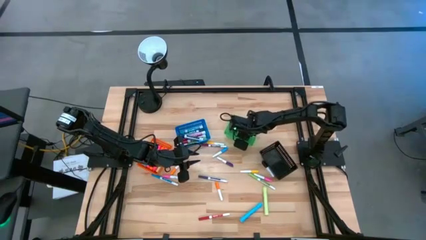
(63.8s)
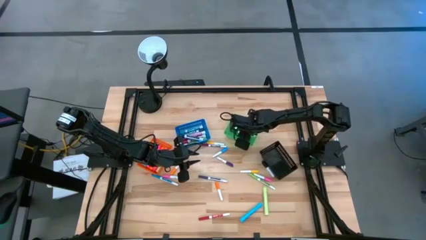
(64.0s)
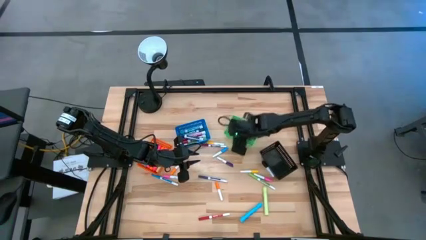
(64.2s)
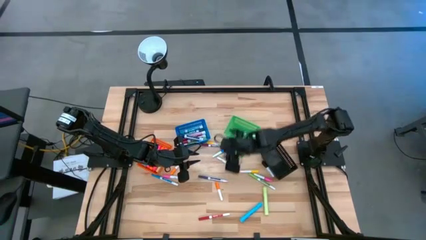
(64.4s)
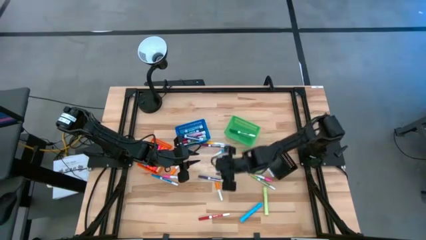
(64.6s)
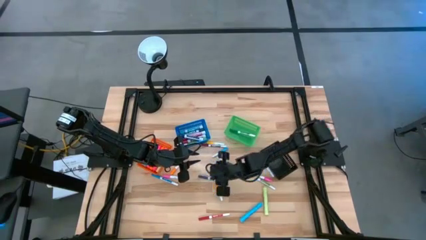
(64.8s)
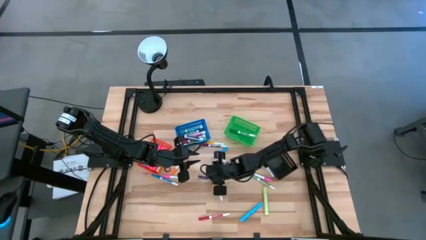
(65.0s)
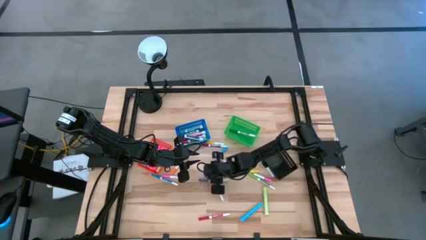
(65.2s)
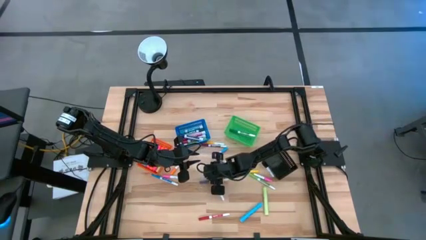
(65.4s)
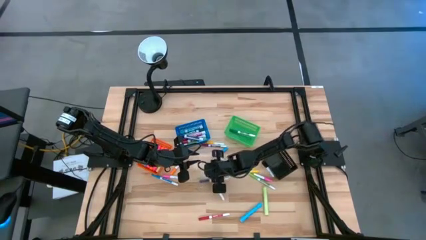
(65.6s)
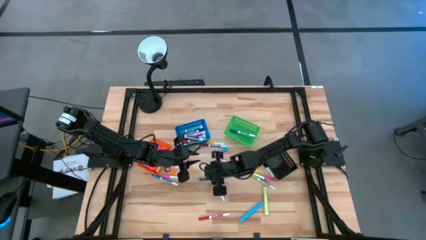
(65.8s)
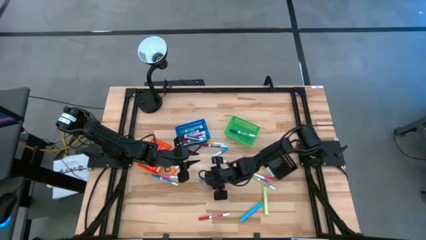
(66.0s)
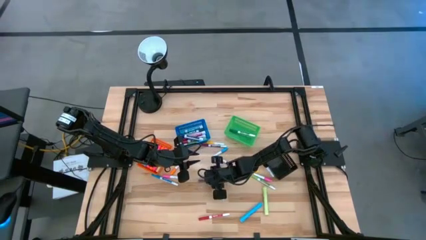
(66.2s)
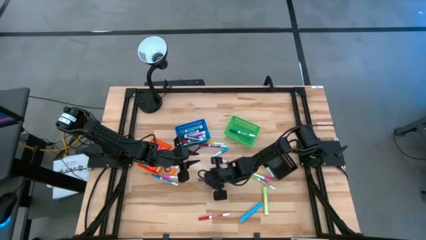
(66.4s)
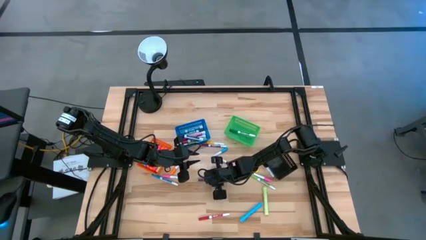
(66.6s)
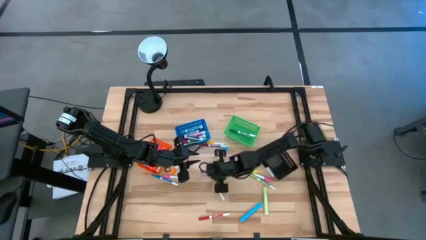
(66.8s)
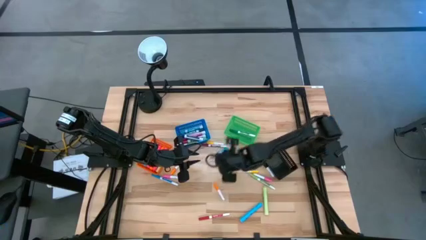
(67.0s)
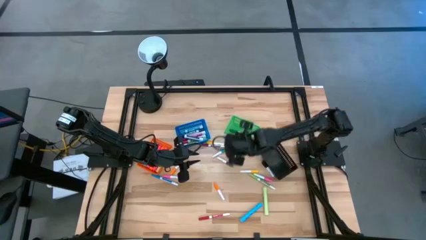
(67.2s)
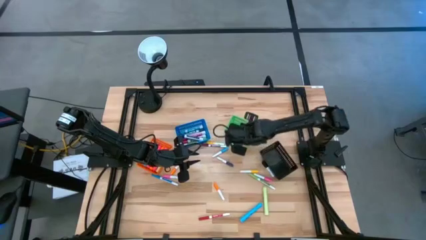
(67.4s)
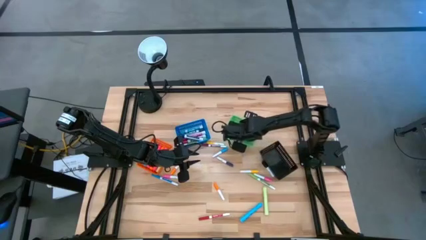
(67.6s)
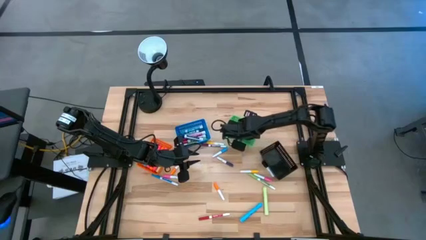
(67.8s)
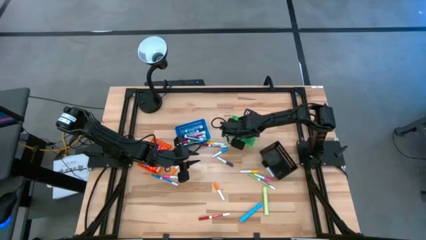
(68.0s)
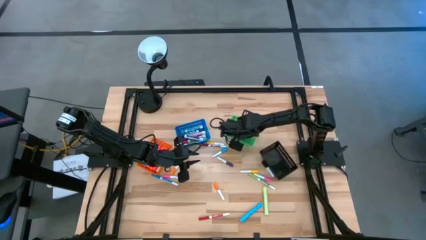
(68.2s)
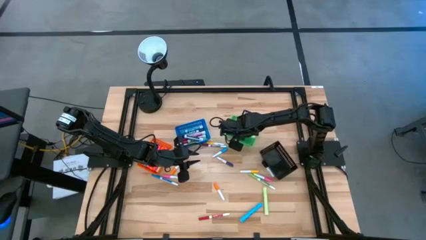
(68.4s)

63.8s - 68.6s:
Task: Pick & Place Markers
Put the large blue marker pen into the green basket

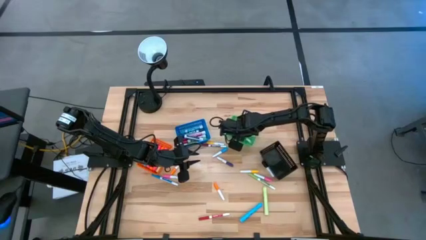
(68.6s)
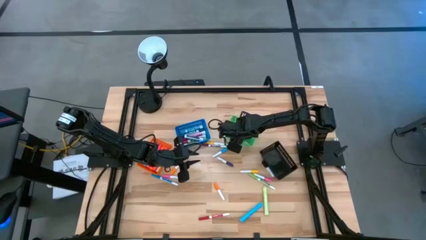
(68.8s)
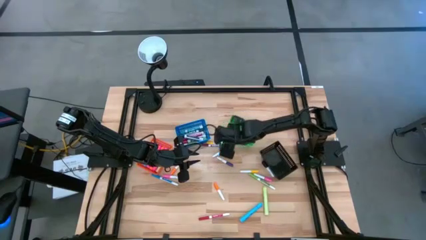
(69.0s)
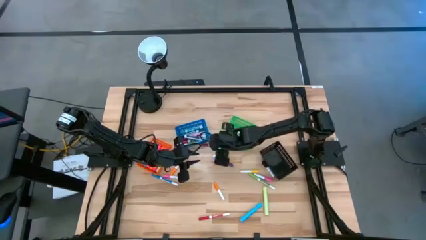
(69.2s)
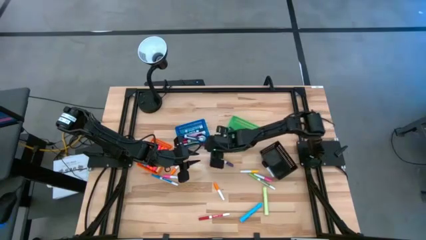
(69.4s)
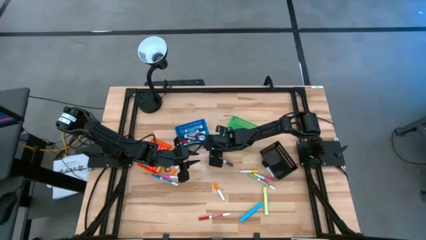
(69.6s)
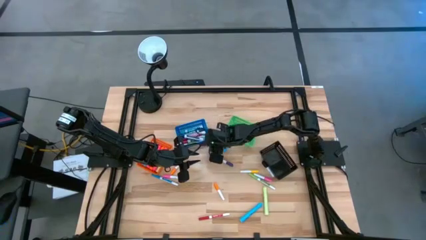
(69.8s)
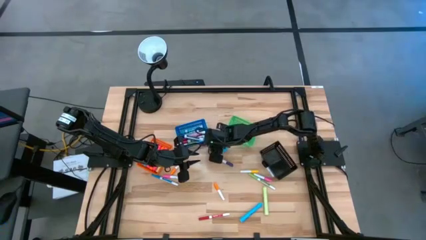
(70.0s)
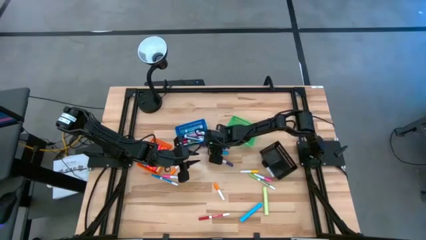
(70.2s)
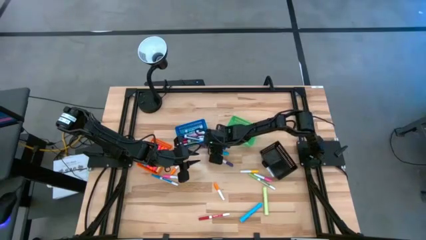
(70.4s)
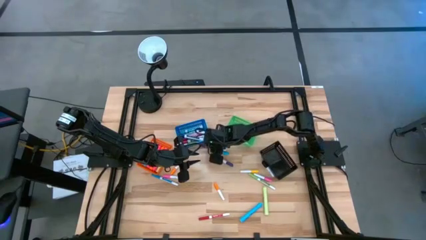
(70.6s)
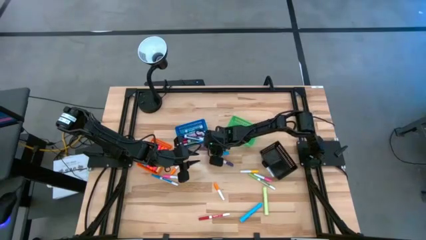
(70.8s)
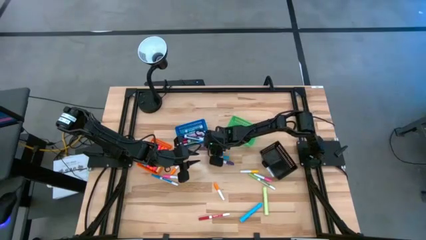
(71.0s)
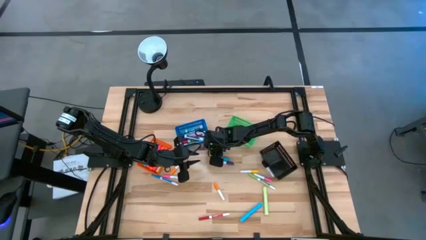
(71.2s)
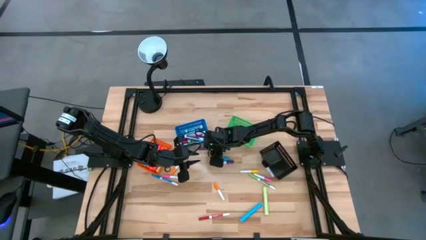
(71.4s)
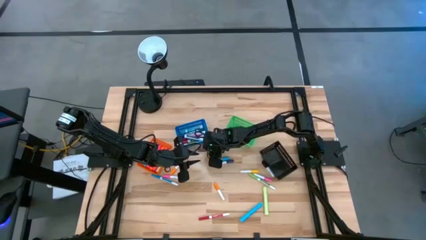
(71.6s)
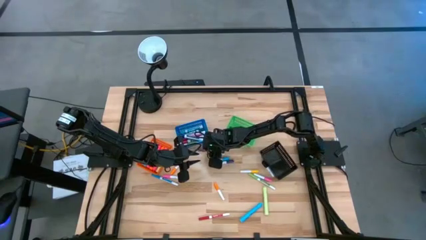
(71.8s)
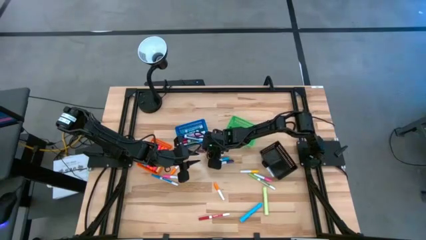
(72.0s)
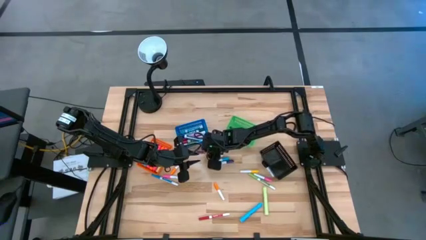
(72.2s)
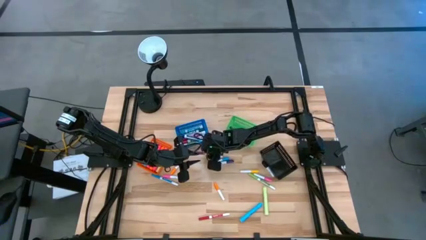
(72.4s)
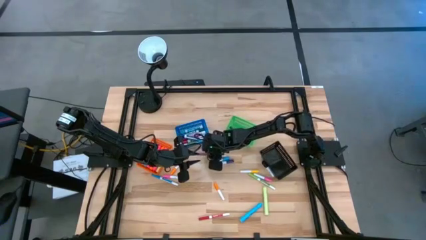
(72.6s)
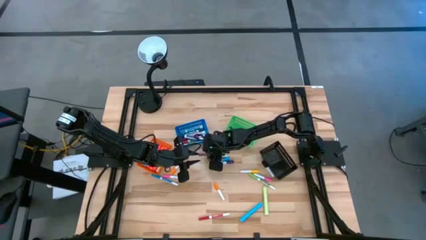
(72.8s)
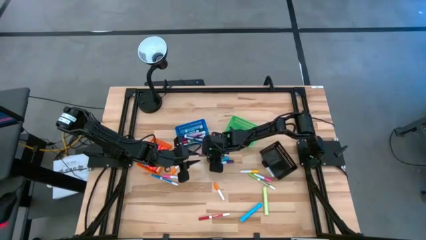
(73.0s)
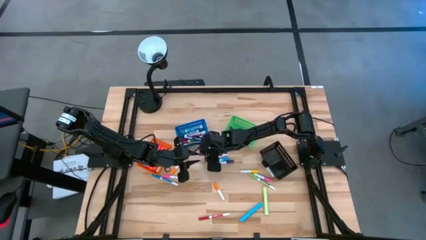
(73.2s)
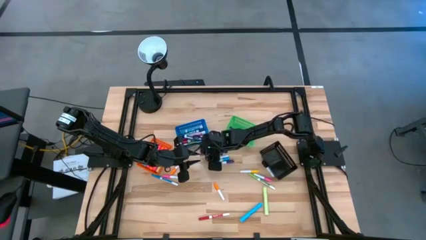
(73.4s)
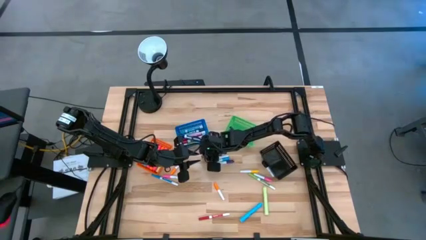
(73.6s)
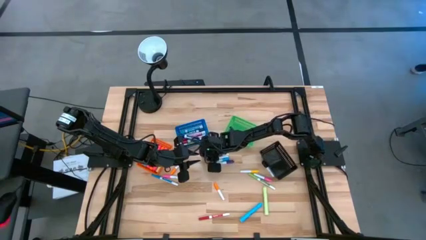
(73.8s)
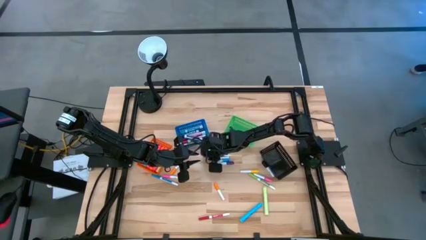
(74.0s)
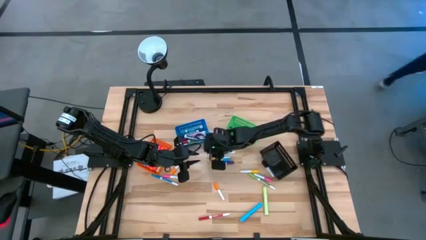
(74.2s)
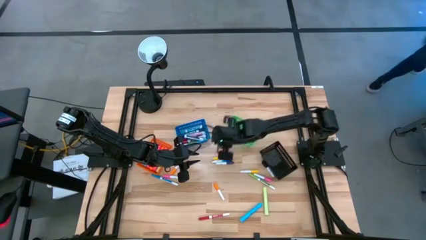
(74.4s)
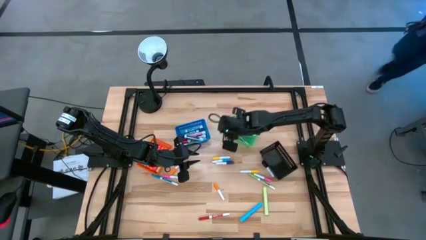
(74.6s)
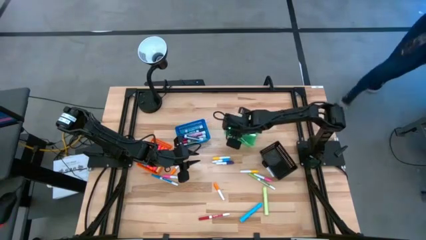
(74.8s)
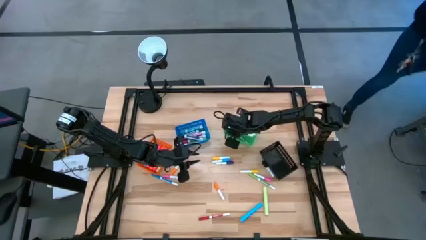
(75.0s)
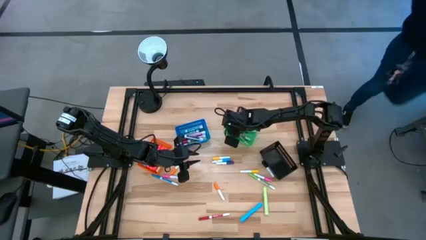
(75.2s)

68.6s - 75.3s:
Put the purple marker pen into the green basket

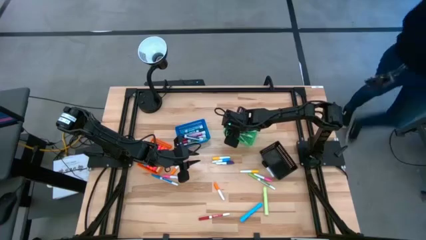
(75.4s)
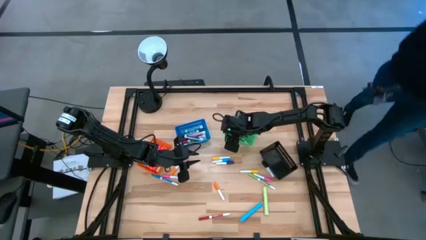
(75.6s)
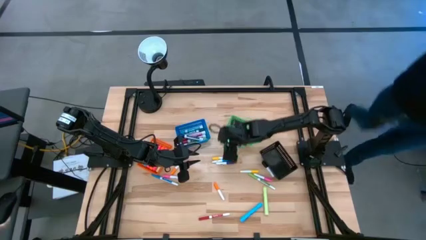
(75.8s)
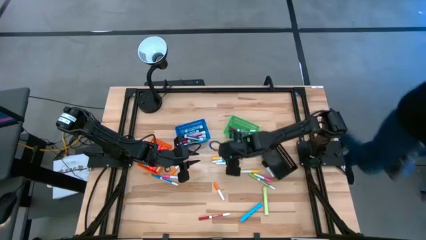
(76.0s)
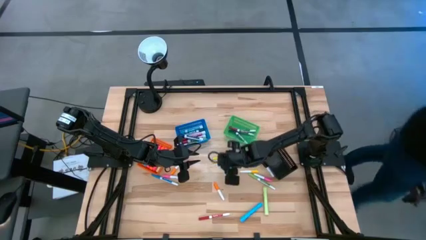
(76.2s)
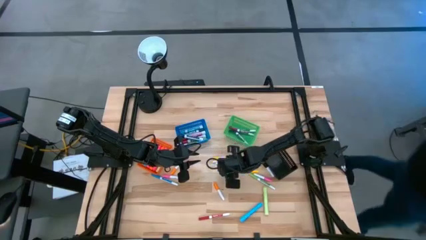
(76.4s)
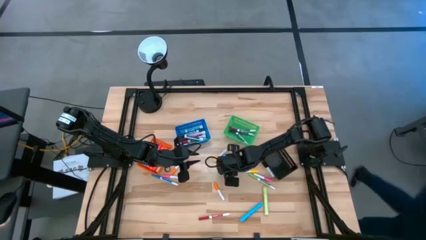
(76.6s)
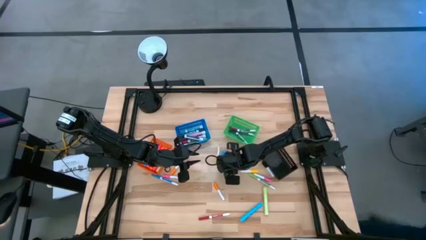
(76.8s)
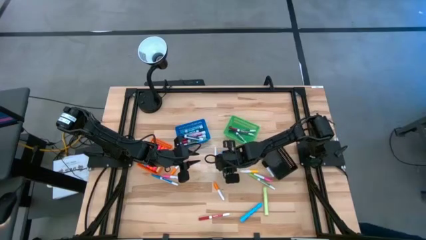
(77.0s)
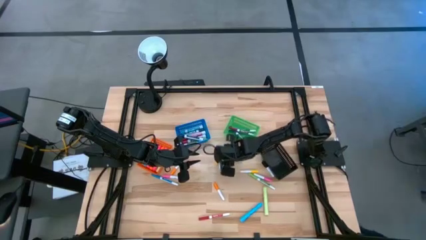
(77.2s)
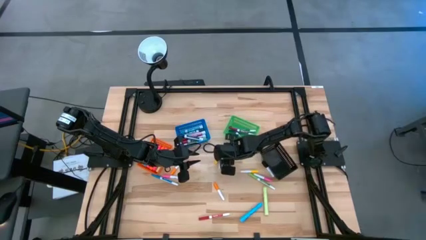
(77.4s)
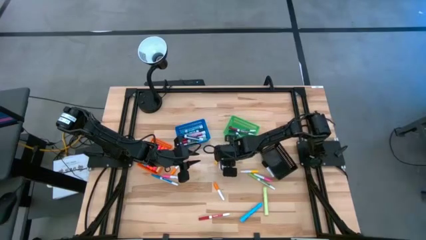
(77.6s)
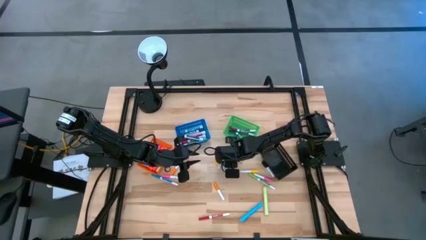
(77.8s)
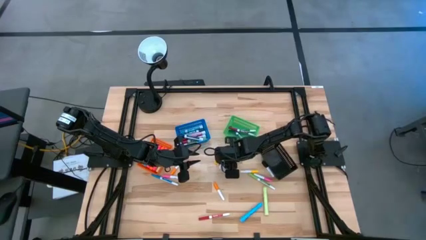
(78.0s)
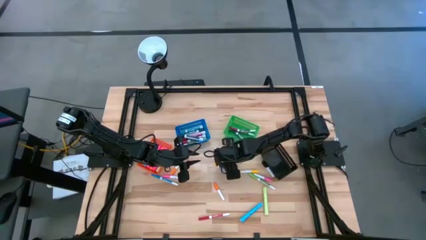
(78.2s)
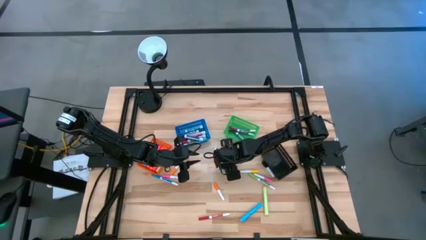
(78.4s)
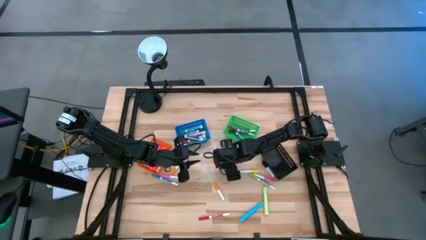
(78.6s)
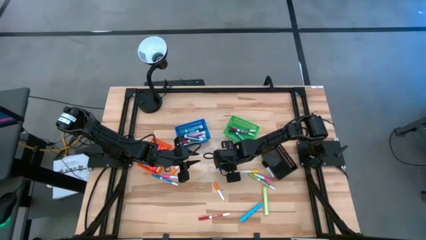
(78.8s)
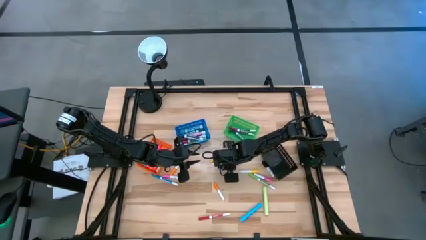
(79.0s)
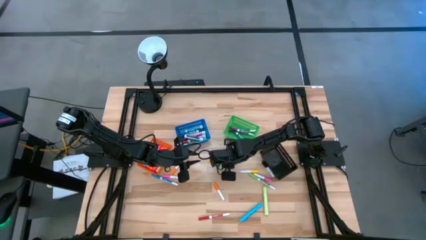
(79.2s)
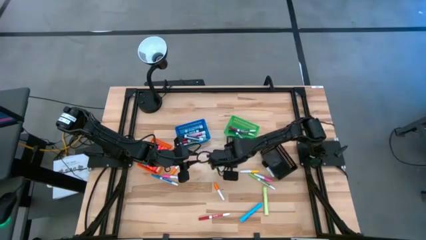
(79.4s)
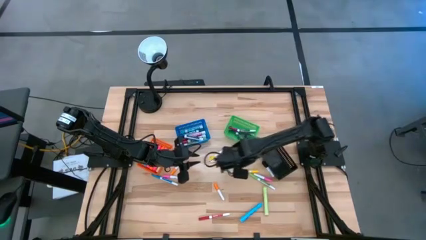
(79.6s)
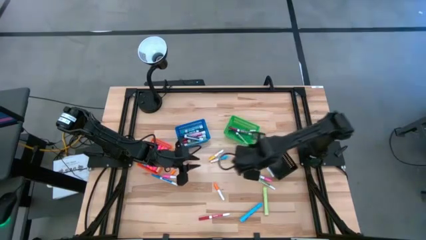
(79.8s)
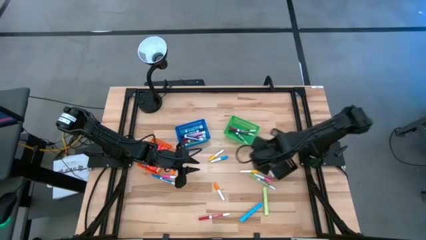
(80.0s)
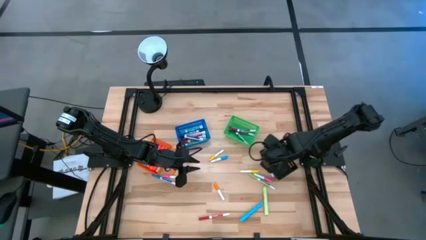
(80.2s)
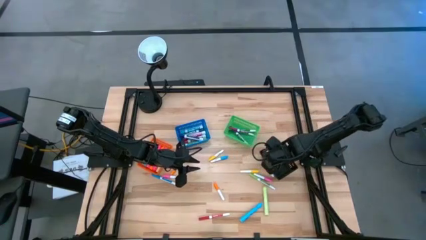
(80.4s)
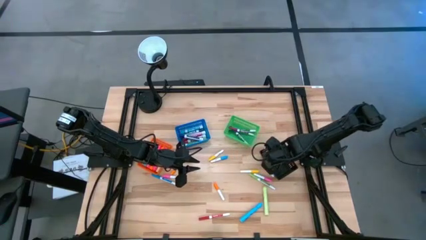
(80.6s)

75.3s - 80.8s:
Put the small violet highlighter pen into the black basket
